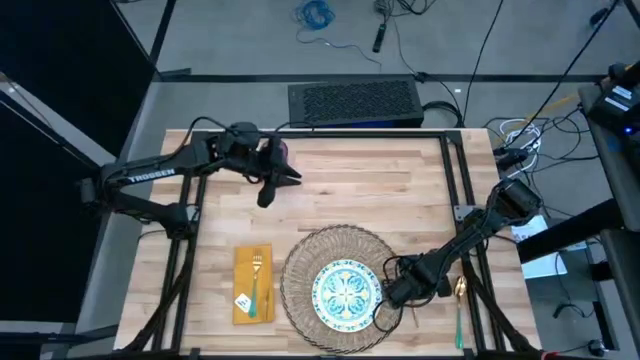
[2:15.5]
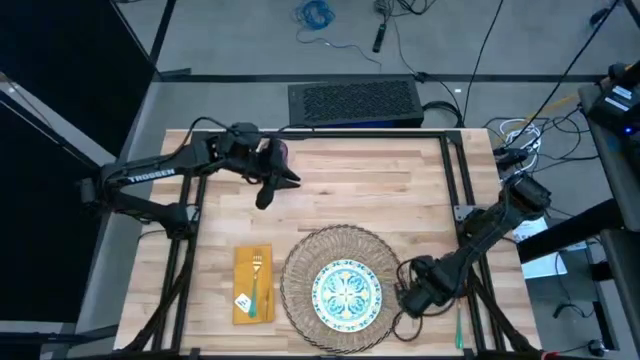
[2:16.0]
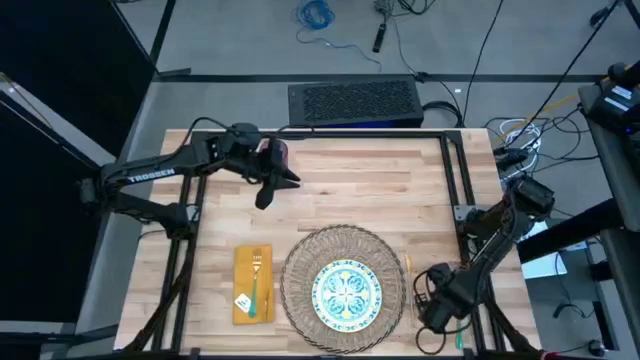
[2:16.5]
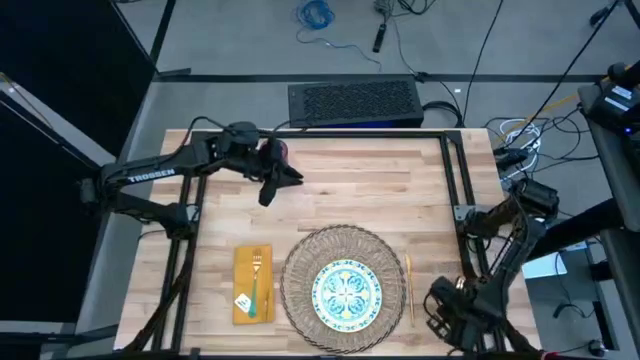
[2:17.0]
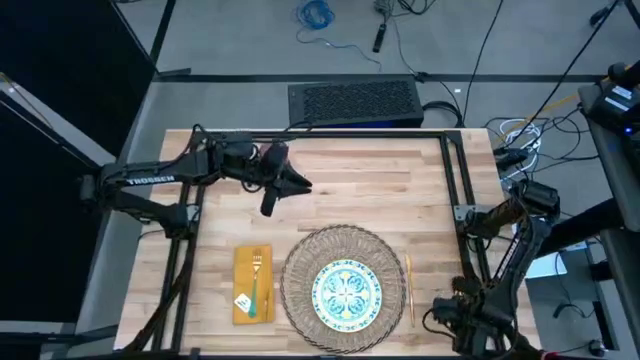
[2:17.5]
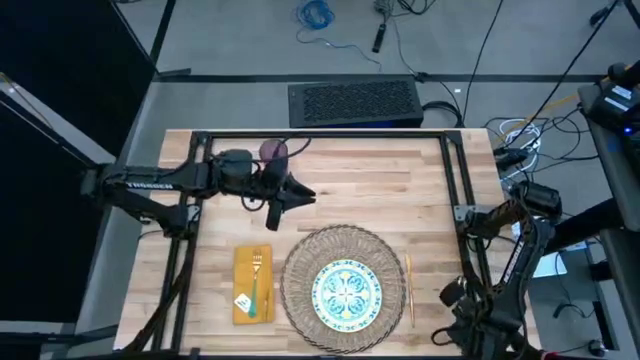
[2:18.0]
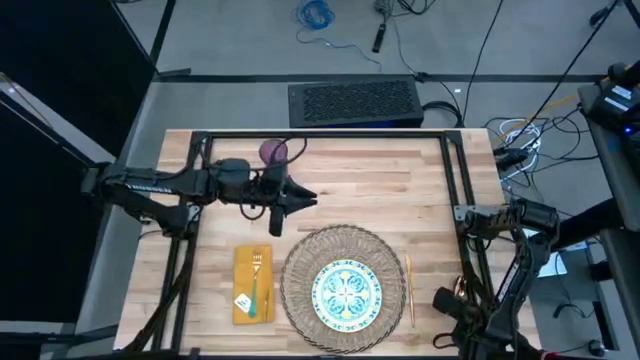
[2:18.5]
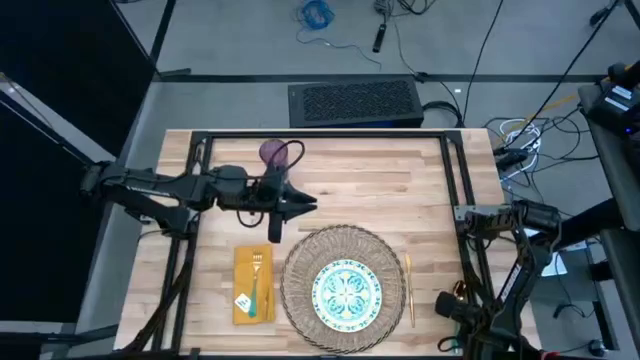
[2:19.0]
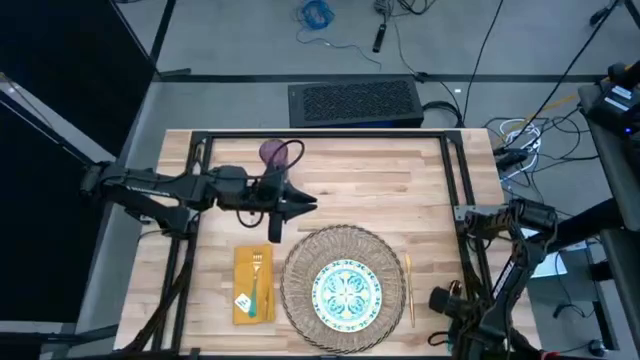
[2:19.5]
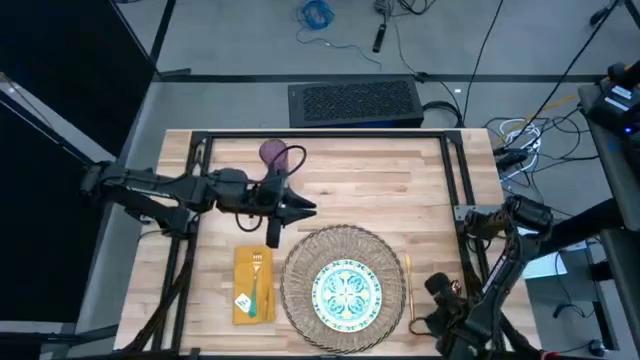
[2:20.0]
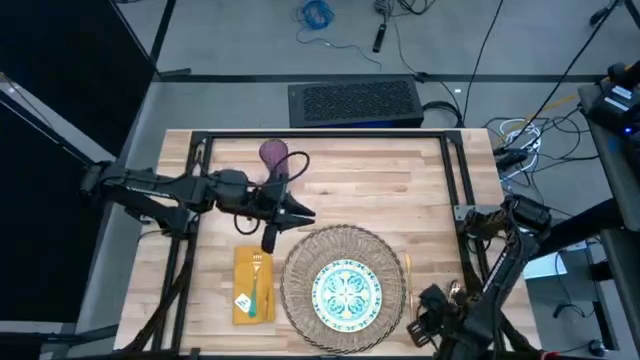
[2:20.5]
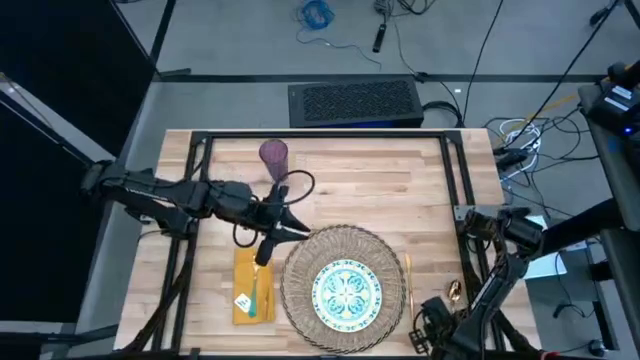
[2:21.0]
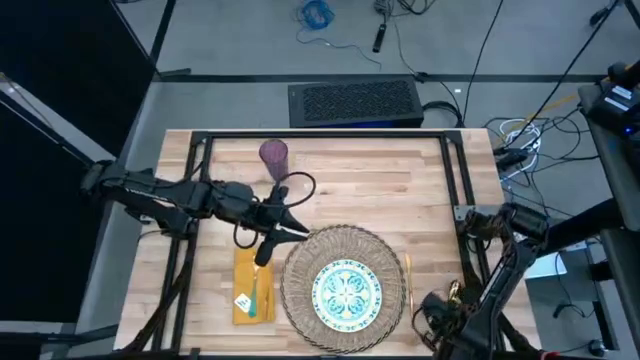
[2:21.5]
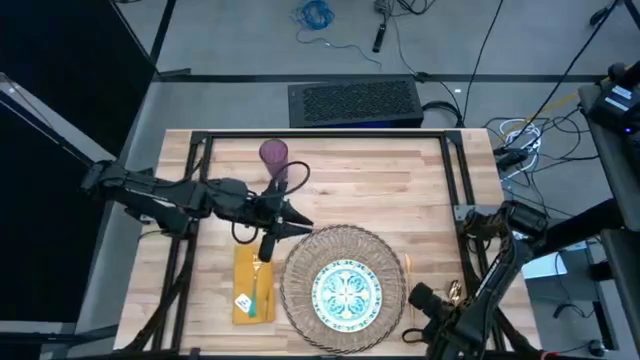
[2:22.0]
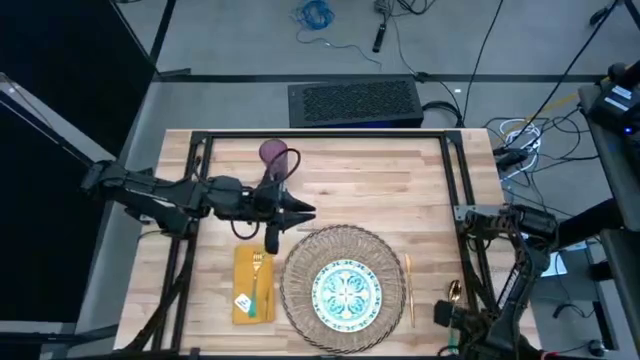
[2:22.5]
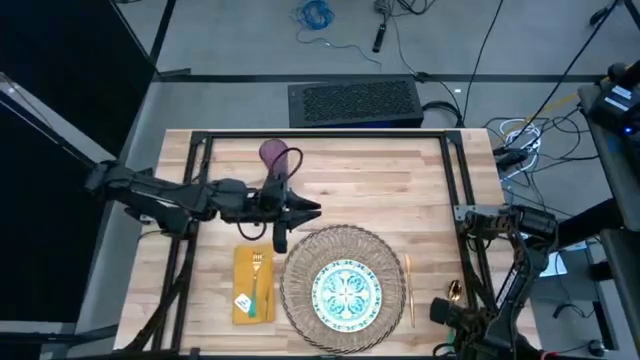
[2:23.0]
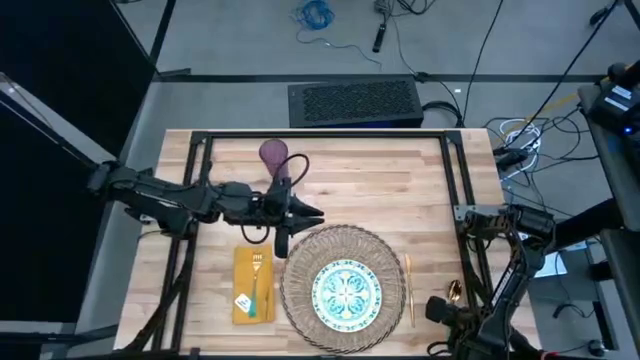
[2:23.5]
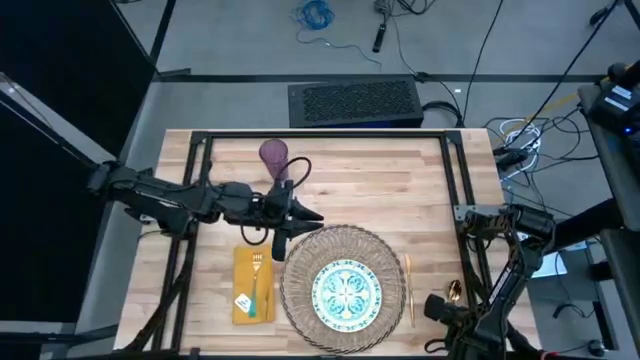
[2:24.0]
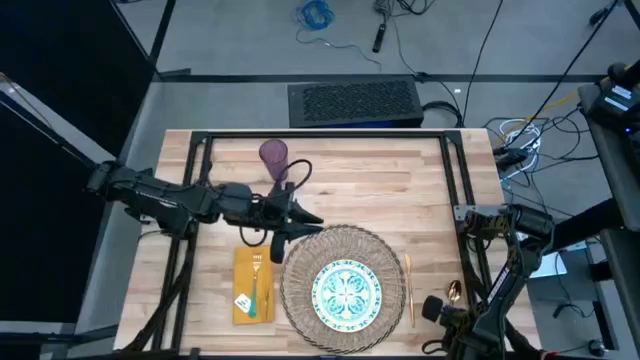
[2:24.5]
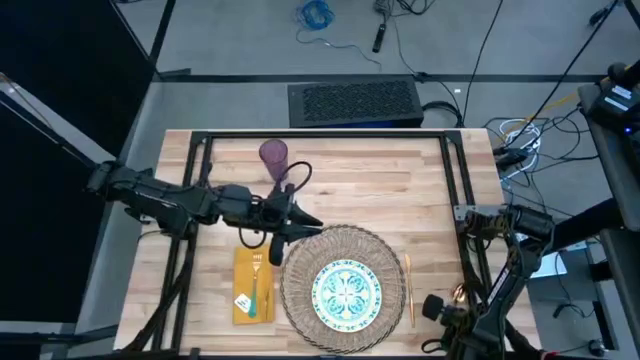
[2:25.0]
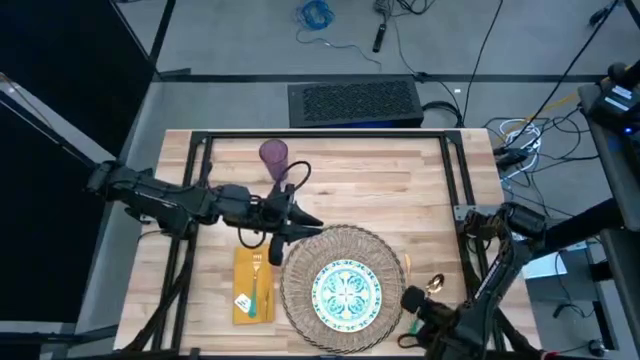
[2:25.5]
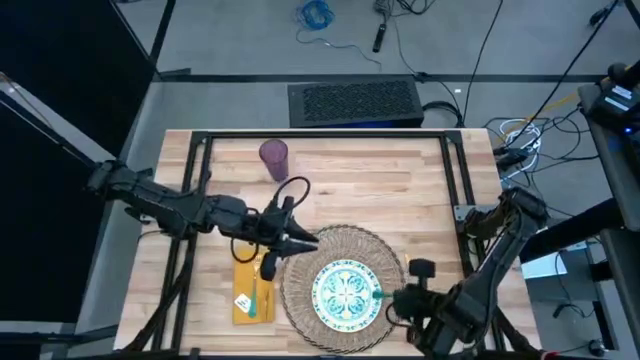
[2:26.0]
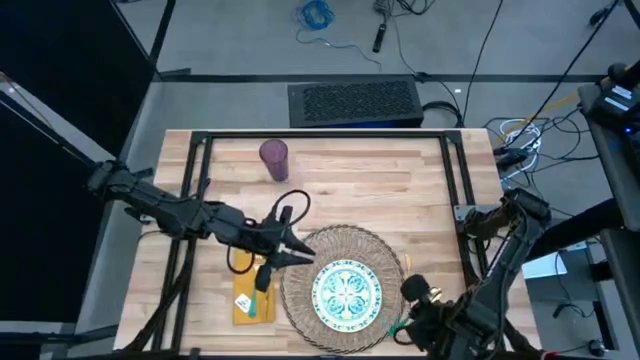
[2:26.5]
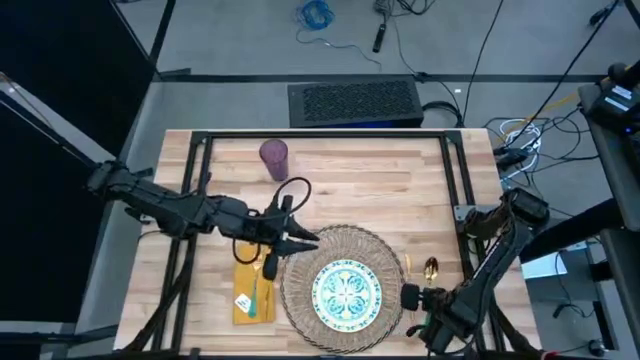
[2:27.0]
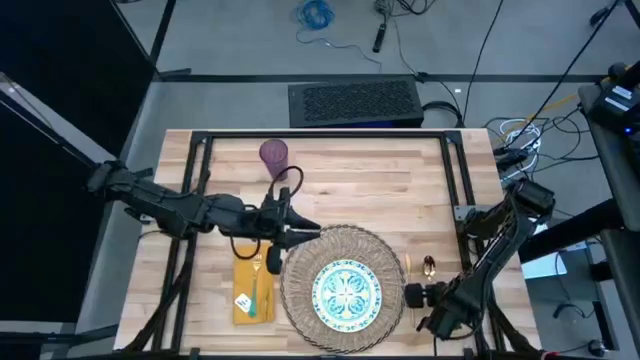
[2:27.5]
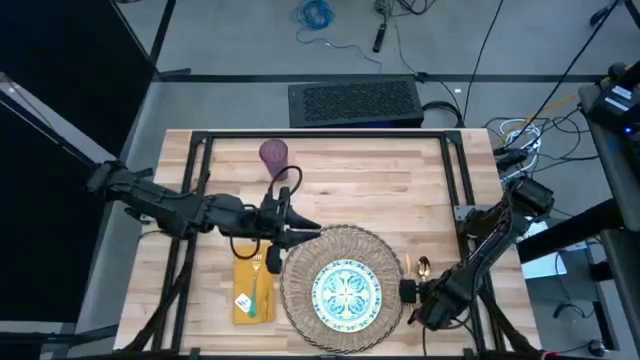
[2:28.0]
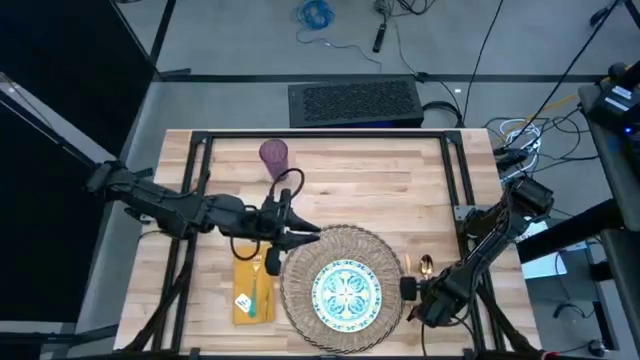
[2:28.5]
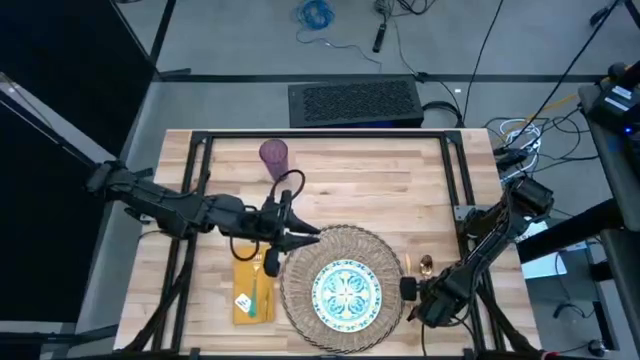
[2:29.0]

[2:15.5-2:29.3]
Task: Set table place
Put the green spoon to the right of the gold knife

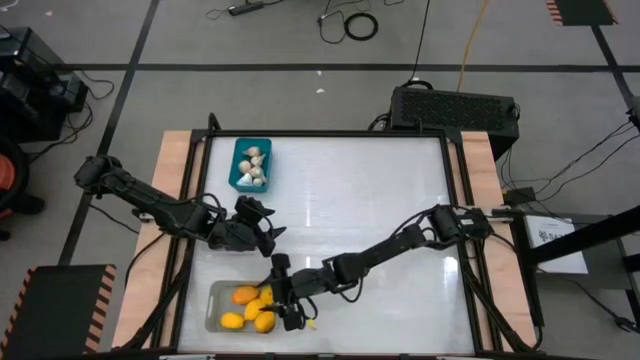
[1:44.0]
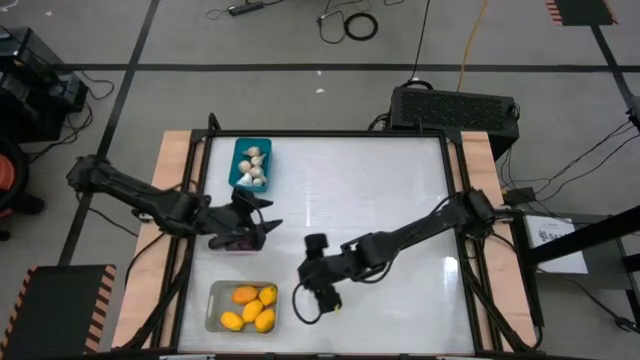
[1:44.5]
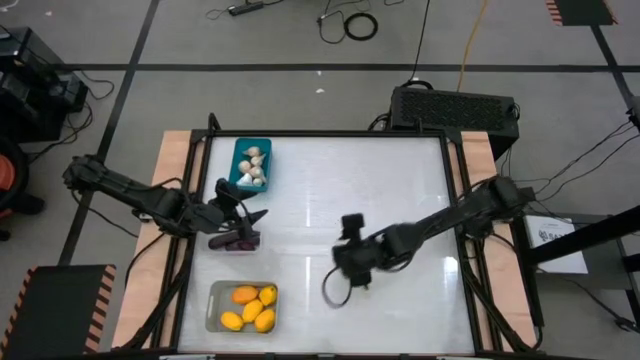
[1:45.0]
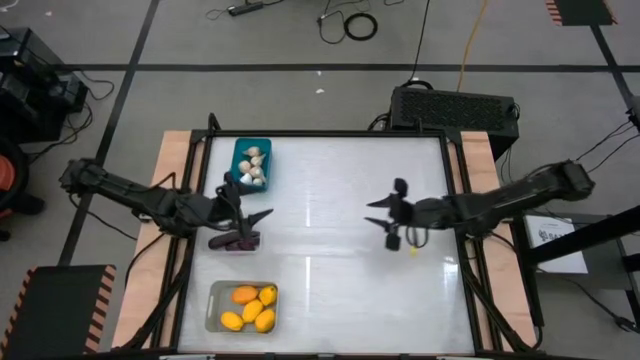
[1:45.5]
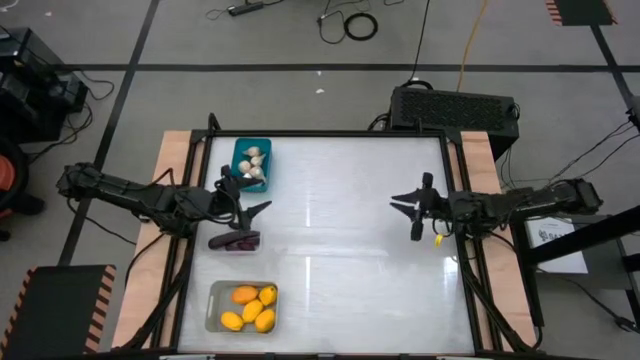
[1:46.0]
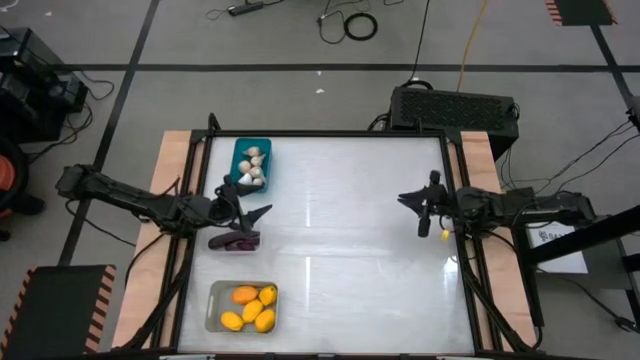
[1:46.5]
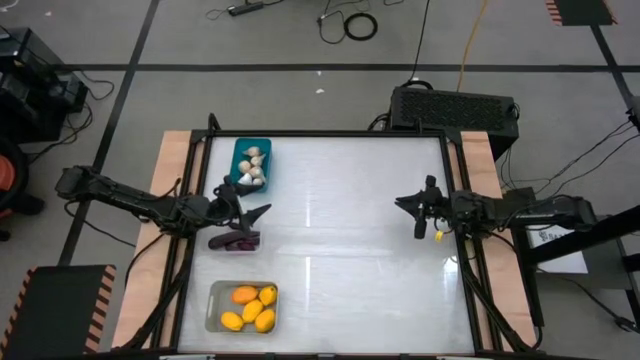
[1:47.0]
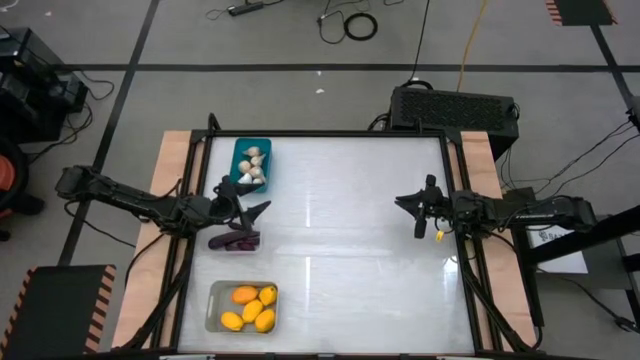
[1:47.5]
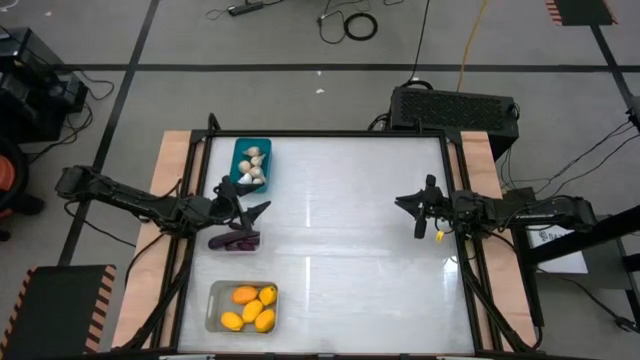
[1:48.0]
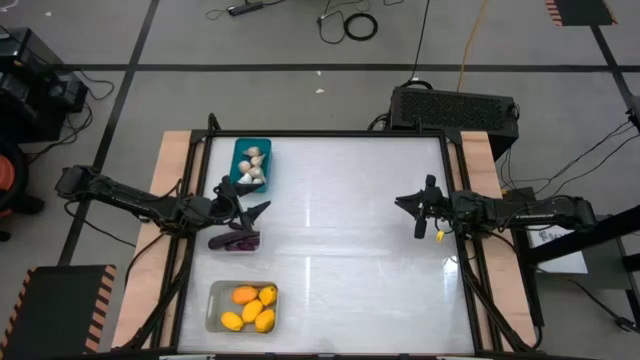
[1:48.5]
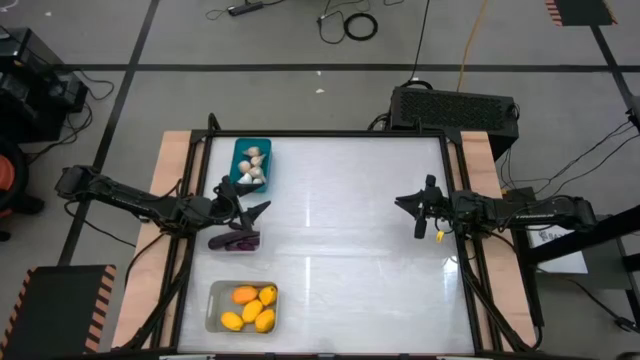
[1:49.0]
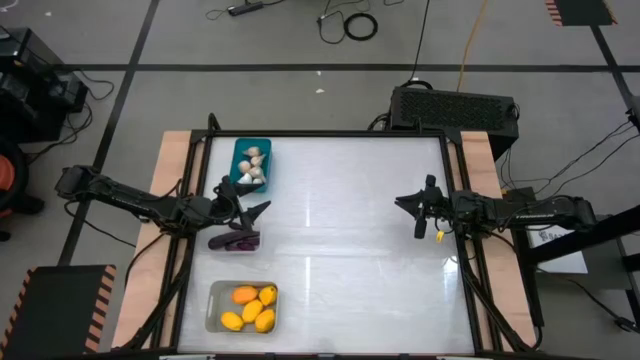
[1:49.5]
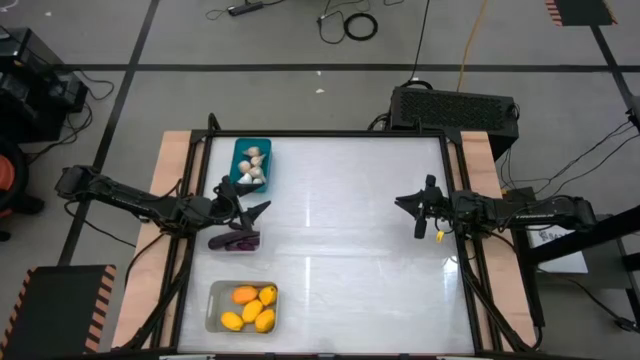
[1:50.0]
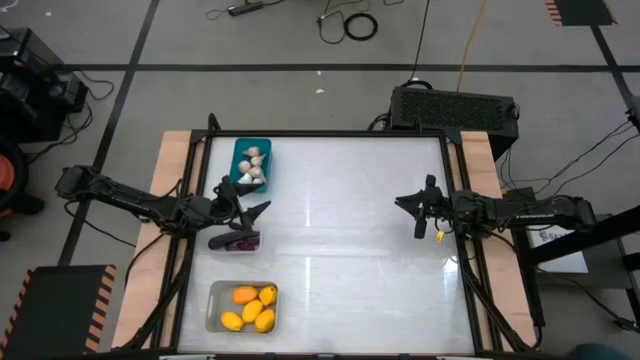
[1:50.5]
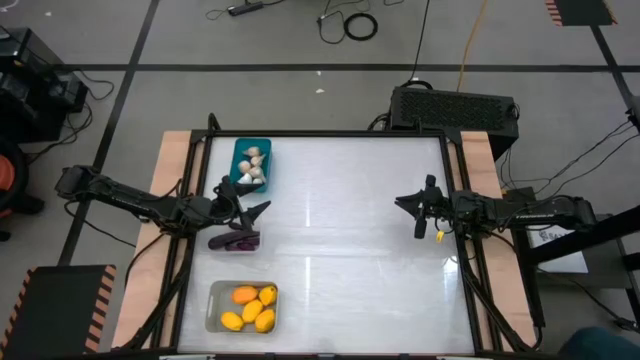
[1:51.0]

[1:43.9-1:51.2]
Task: Sort produce into baskets
Return to Home Position
